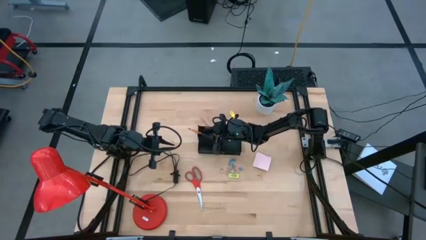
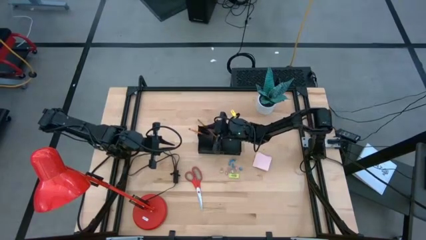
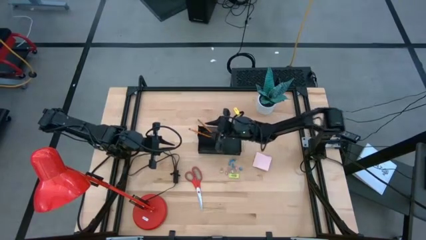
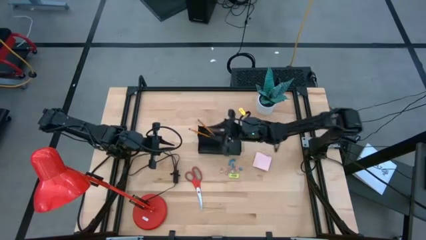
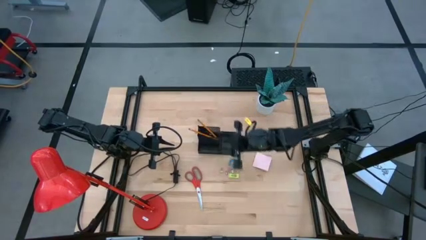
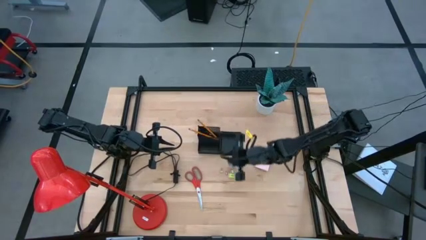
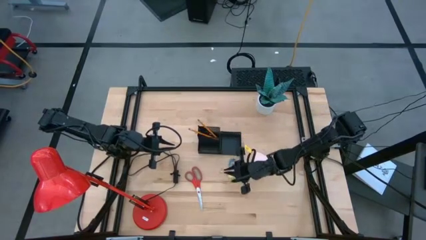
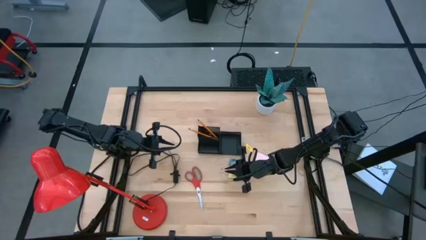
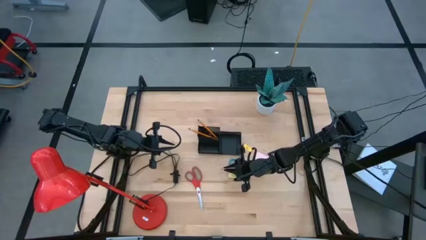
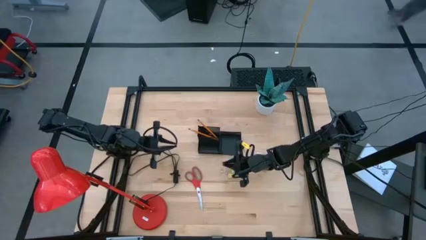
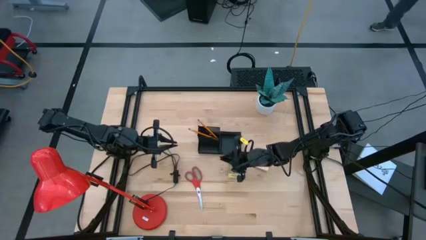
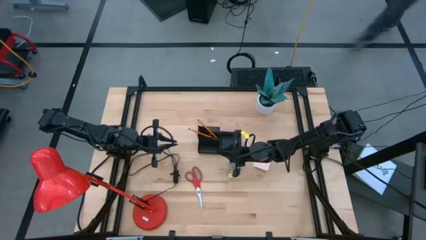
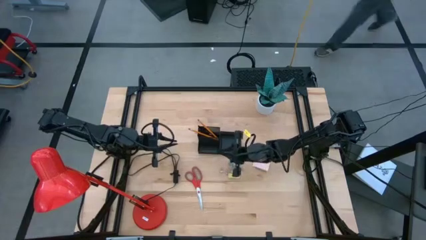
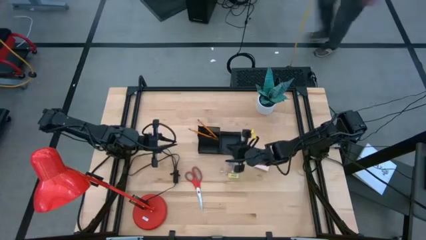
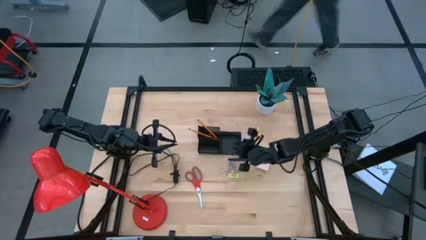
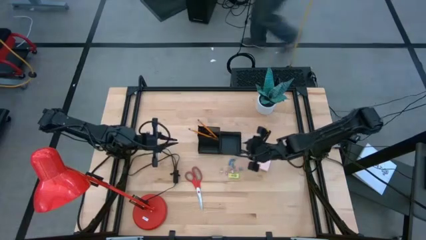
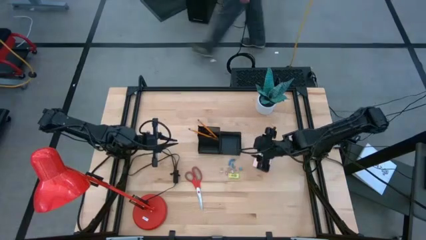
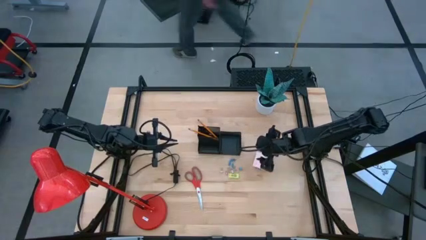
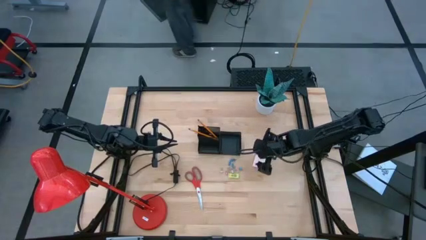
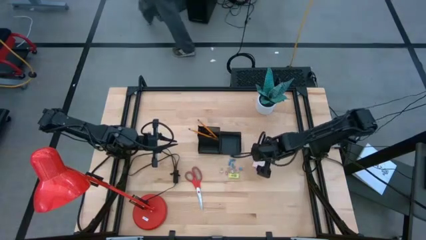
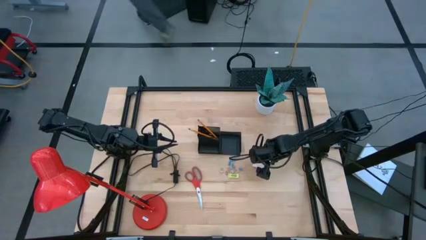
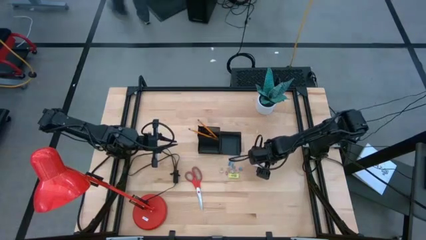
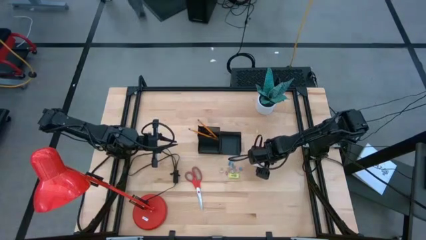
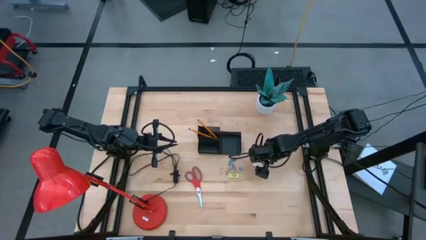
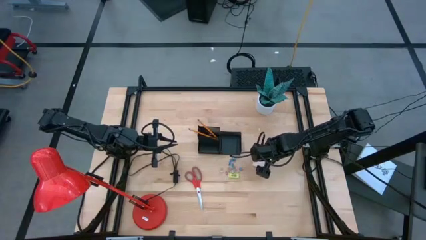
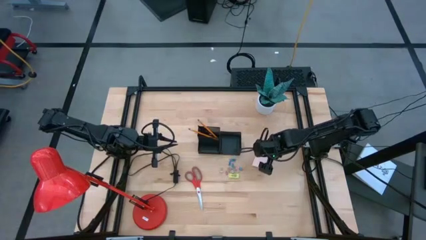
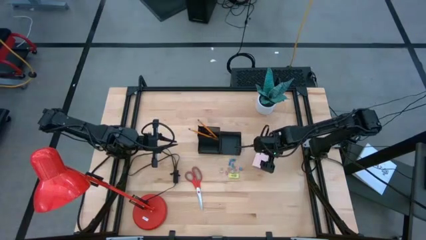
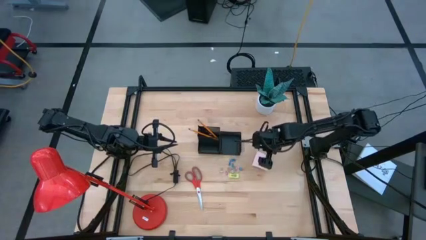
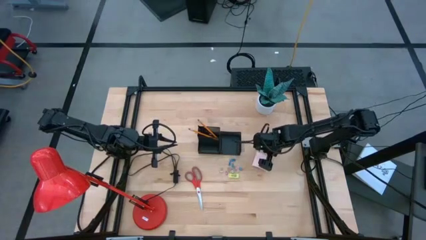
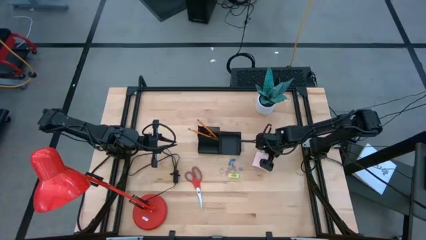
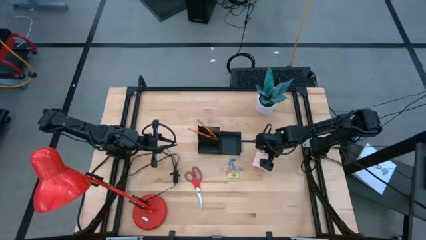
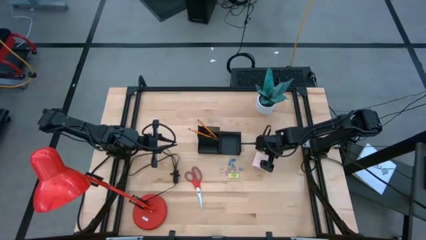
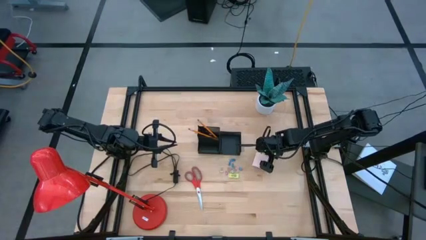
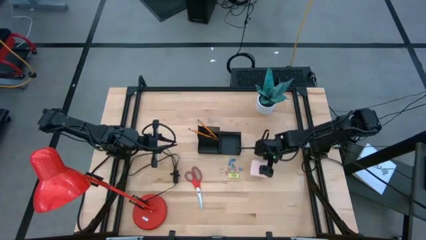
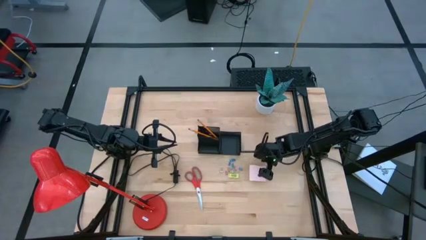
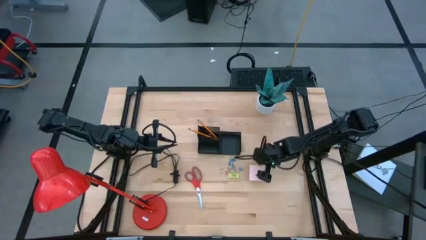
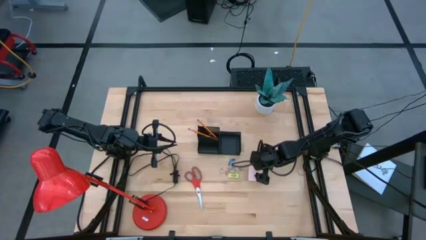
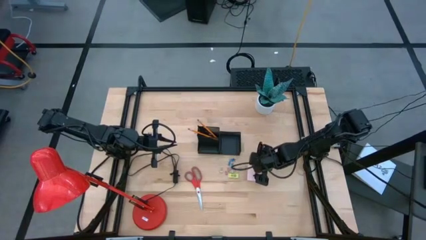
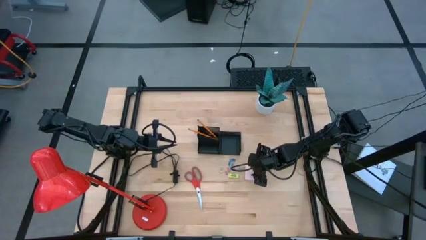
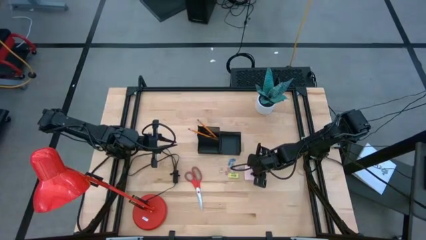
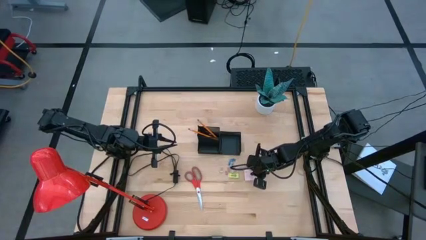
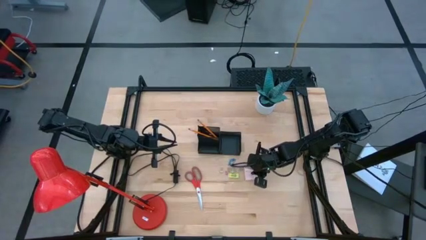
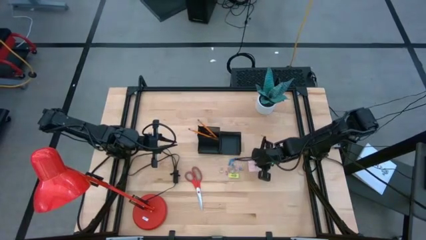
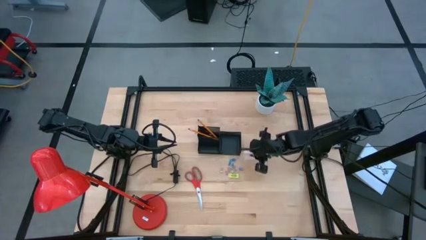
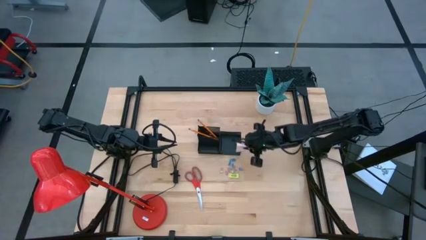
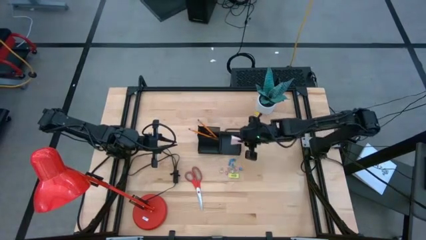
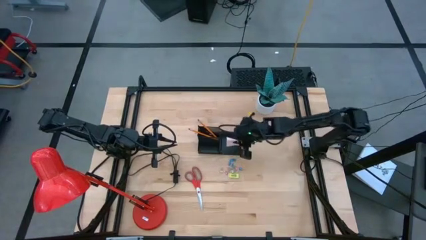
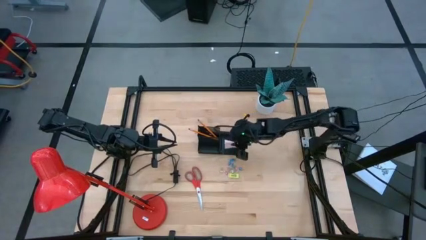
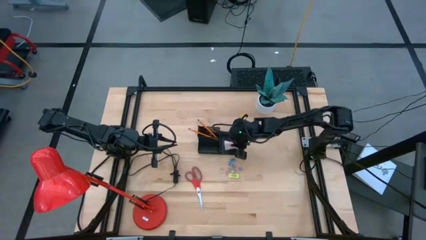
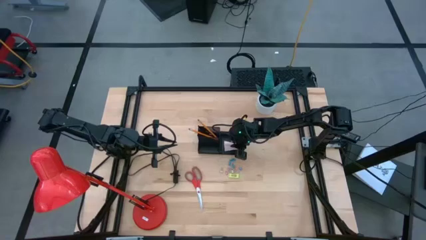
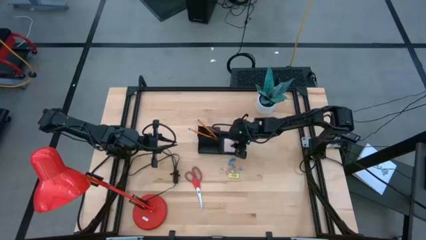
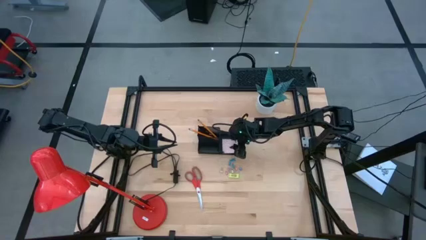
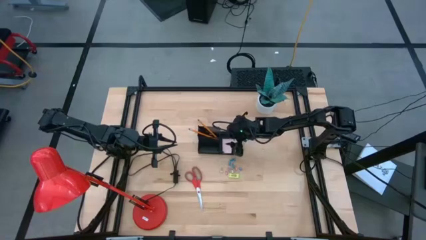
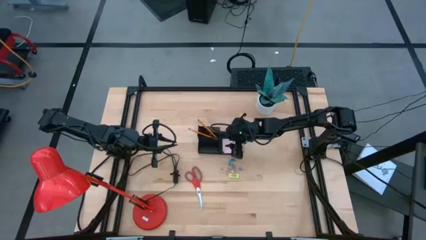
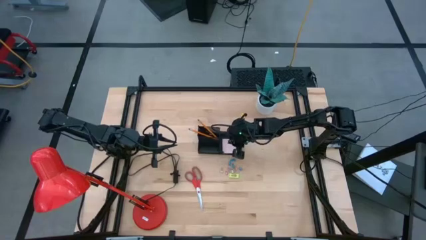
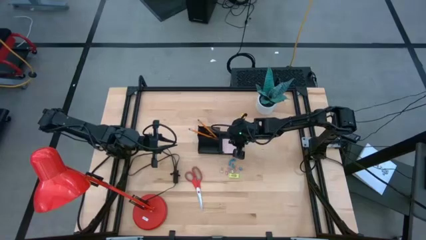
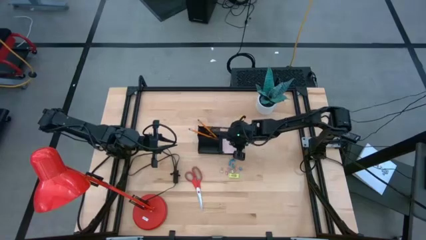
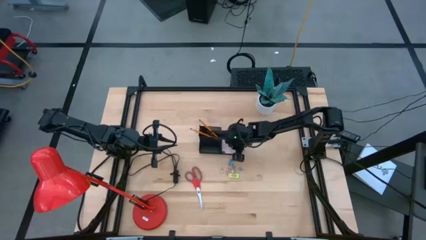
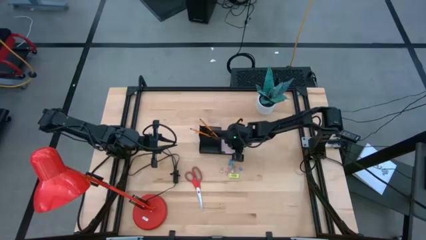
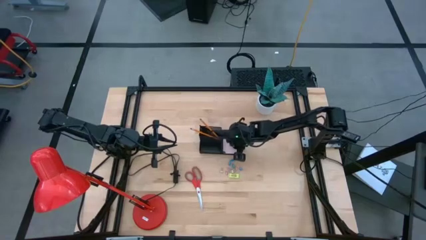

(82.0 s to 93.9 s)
Task: Pick and place office supplies into organizer
Put the sticky note into the black desk organizer

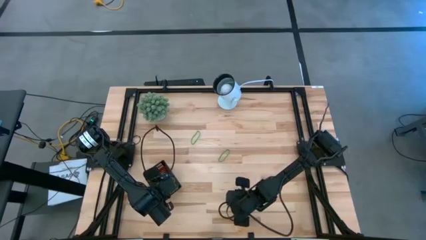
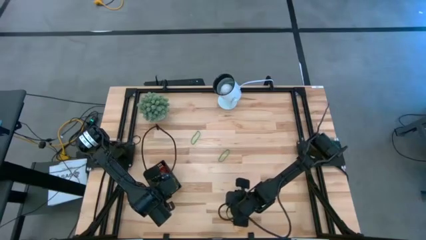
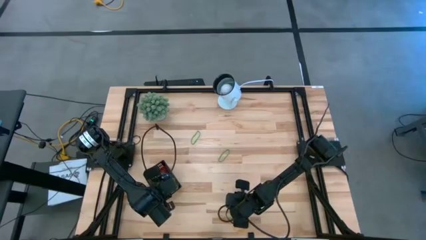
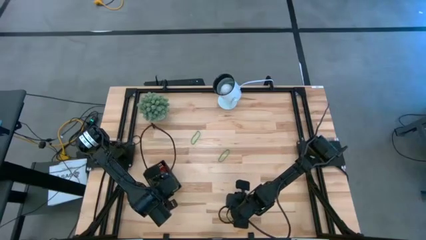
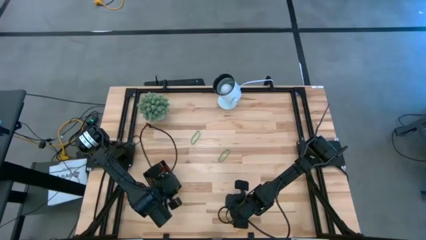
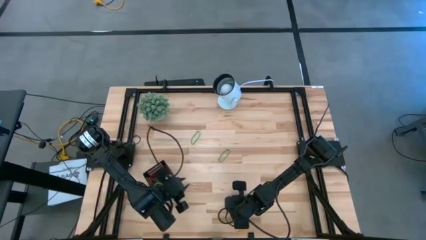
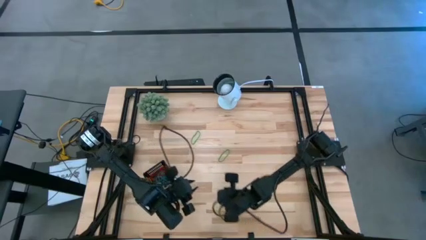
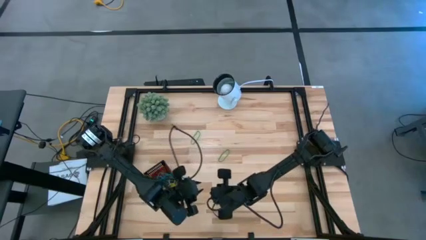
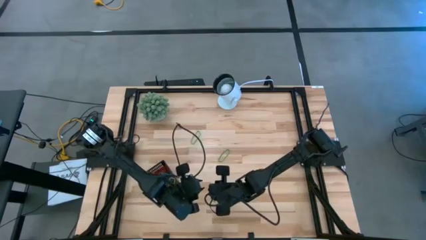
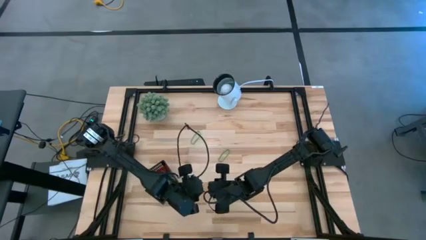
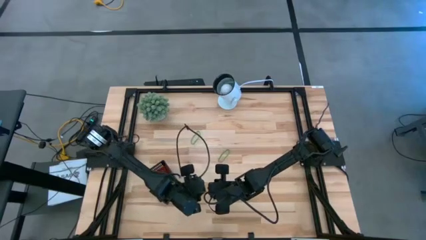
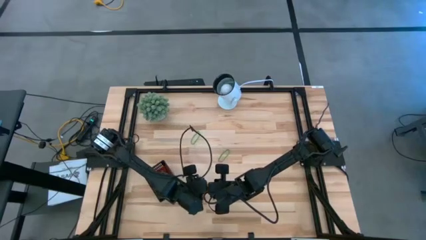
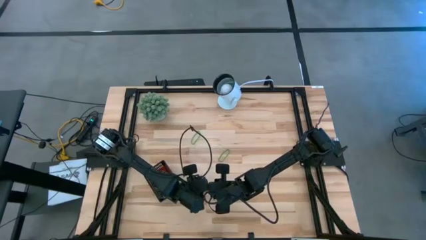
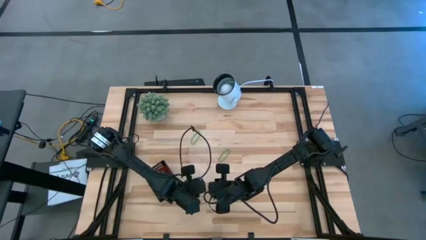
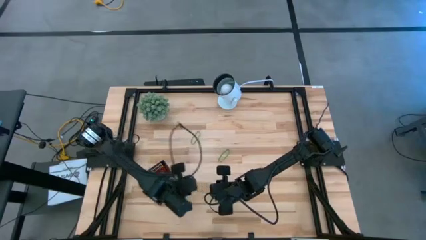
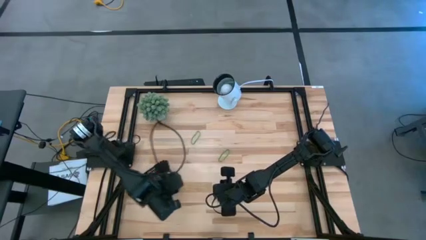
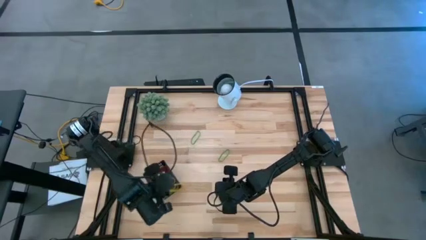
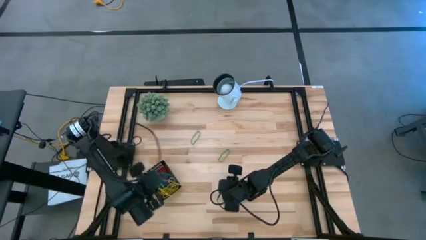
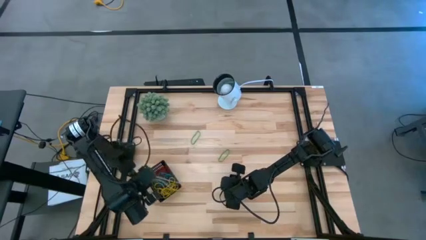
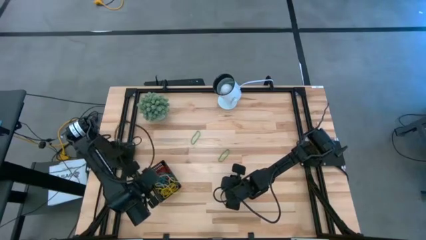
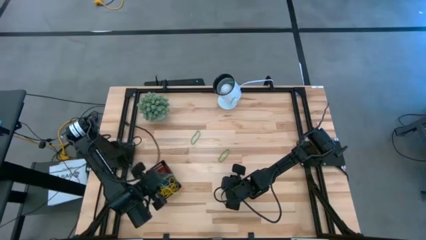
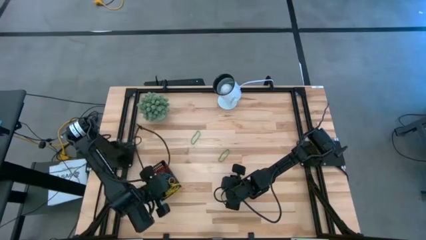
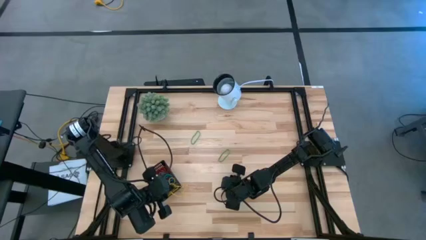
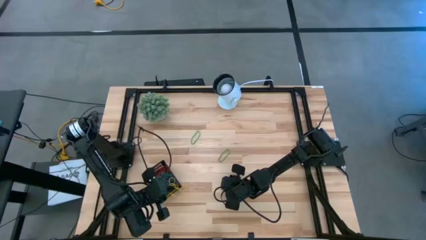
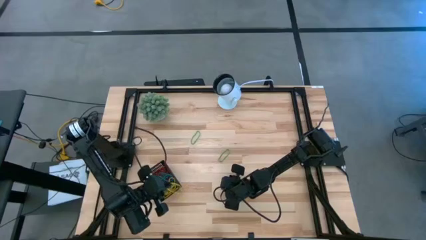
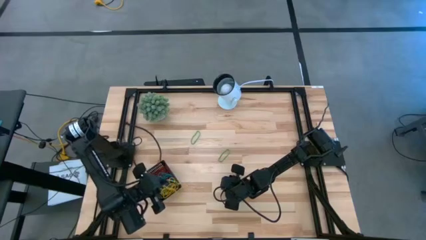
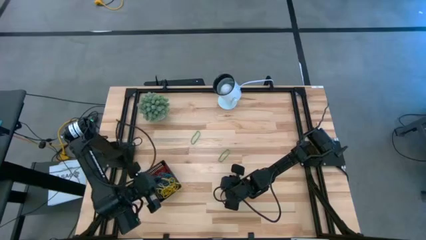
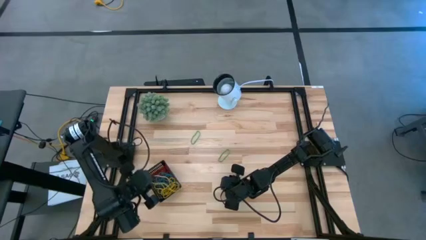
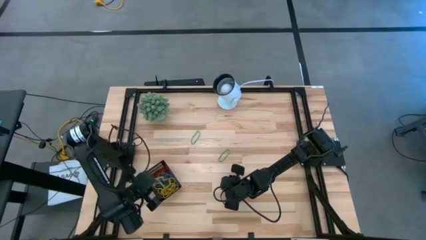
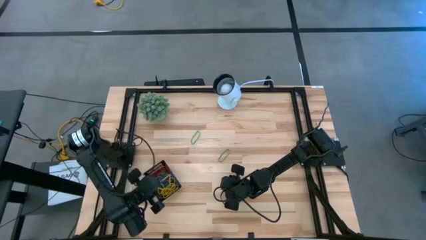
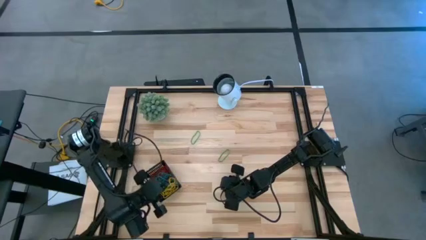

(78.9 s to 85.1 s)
Task: Pick and place items into bin
Put the yellow rubber band into the black bin
